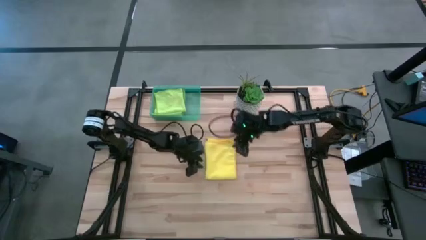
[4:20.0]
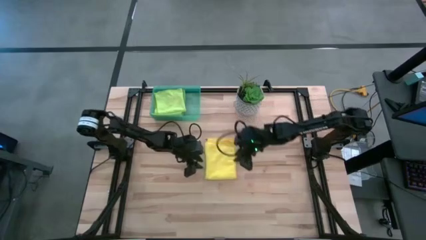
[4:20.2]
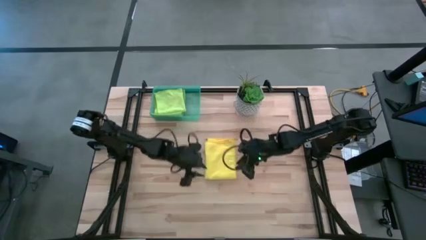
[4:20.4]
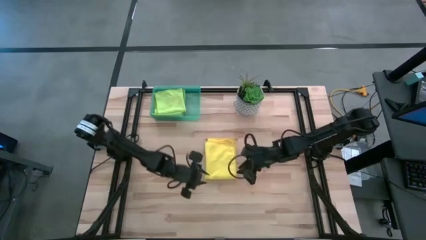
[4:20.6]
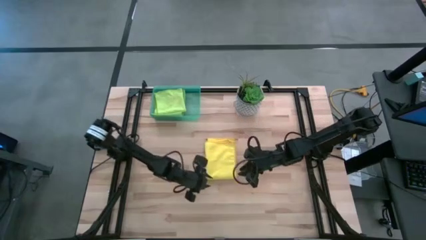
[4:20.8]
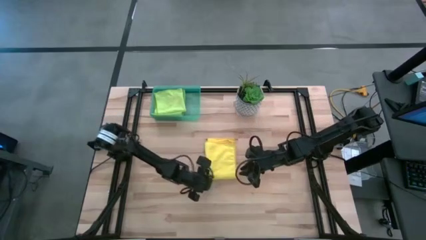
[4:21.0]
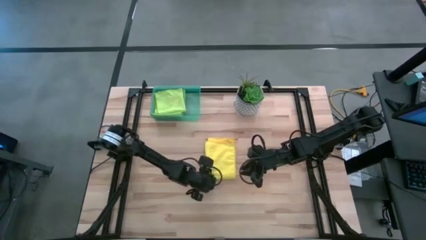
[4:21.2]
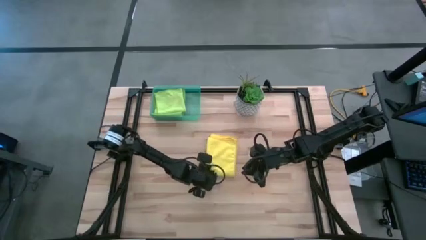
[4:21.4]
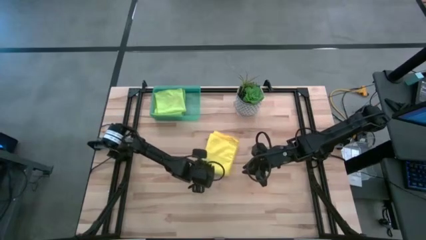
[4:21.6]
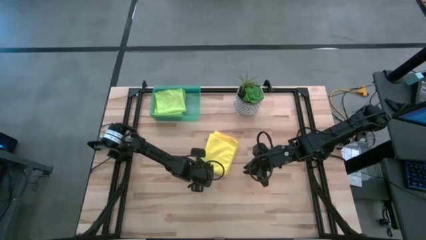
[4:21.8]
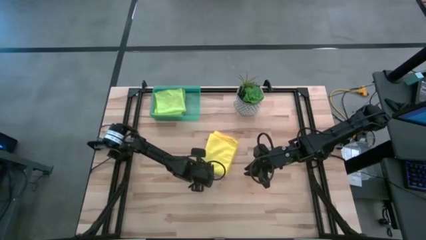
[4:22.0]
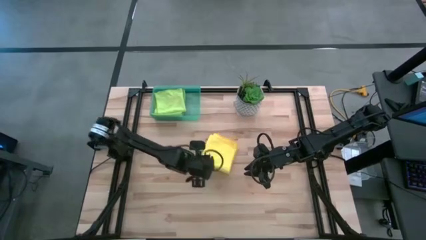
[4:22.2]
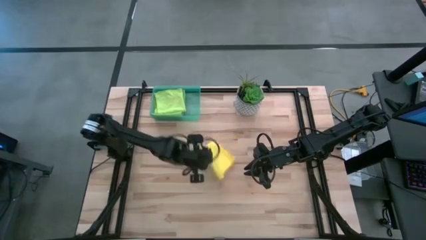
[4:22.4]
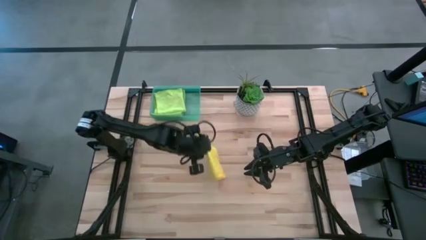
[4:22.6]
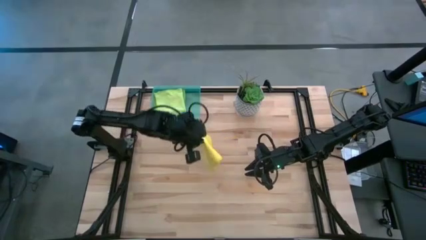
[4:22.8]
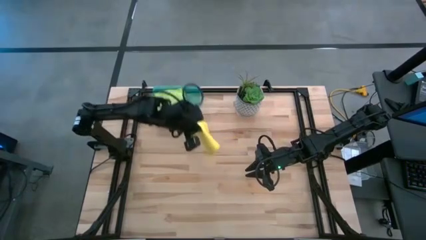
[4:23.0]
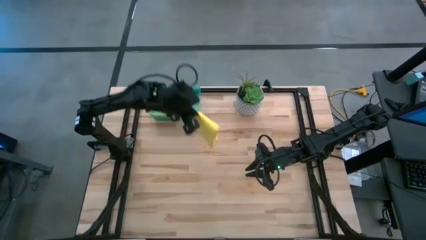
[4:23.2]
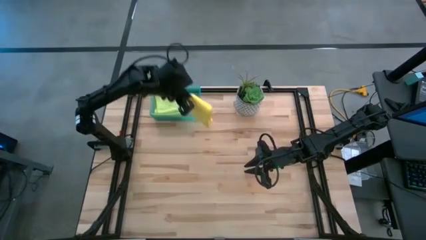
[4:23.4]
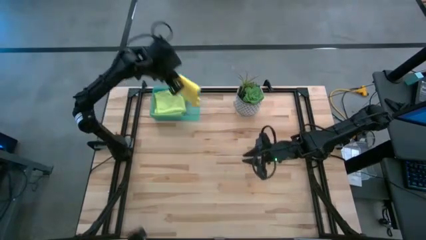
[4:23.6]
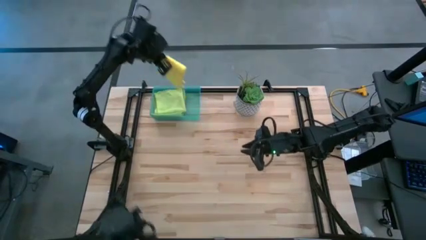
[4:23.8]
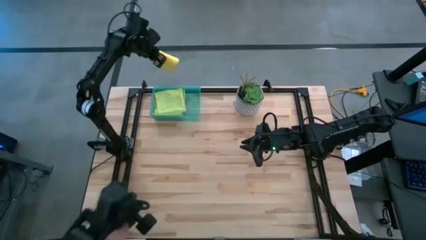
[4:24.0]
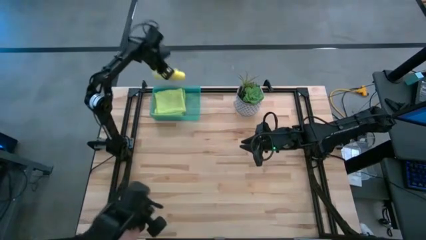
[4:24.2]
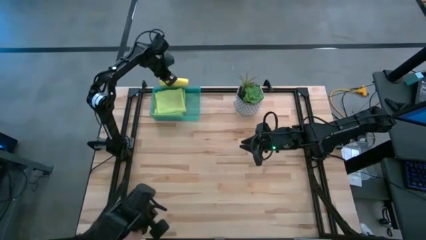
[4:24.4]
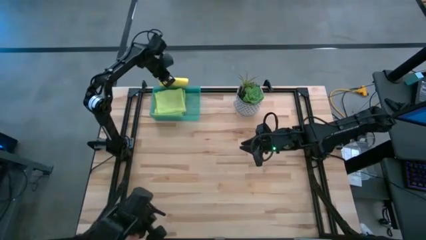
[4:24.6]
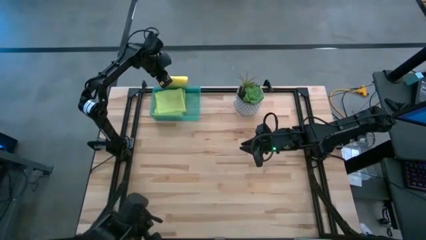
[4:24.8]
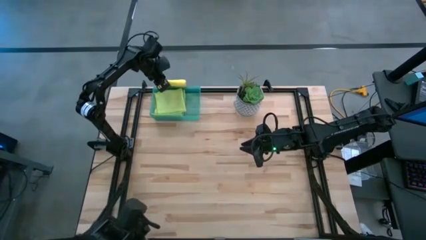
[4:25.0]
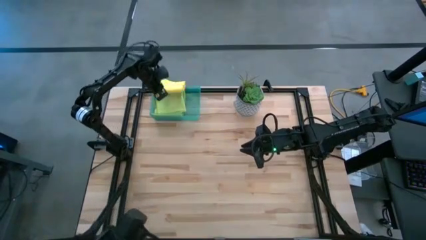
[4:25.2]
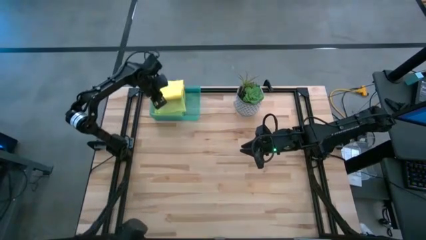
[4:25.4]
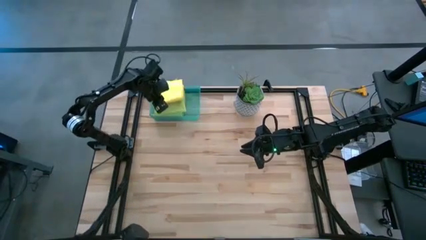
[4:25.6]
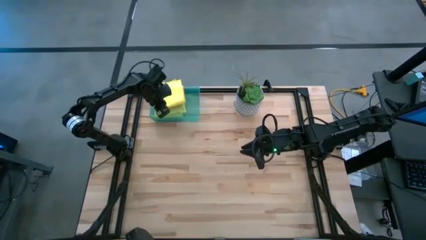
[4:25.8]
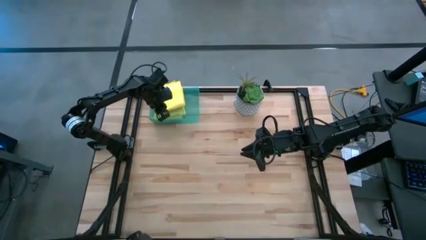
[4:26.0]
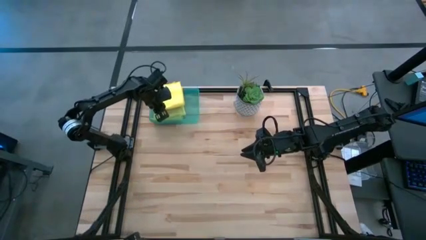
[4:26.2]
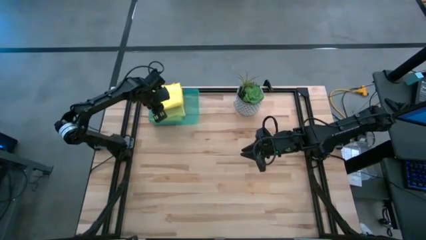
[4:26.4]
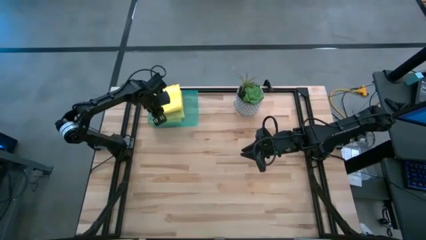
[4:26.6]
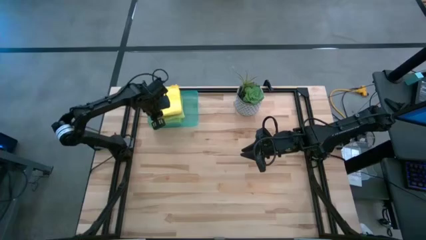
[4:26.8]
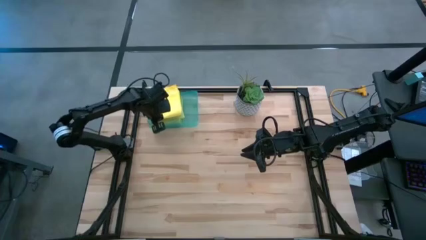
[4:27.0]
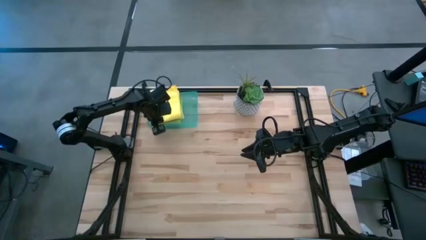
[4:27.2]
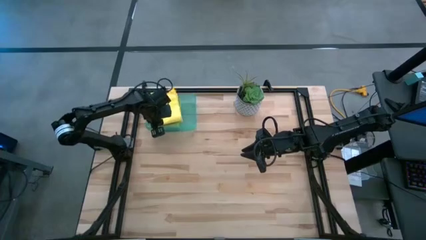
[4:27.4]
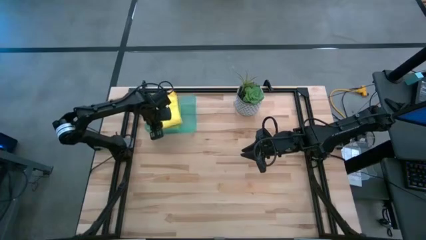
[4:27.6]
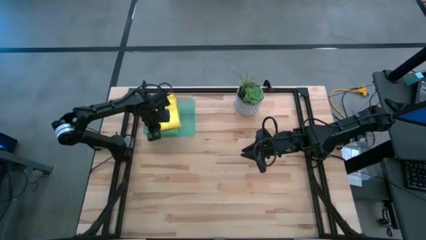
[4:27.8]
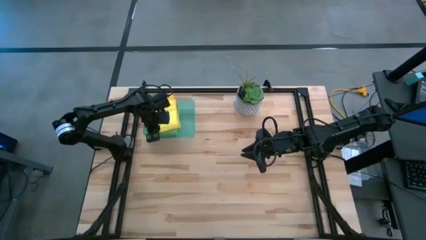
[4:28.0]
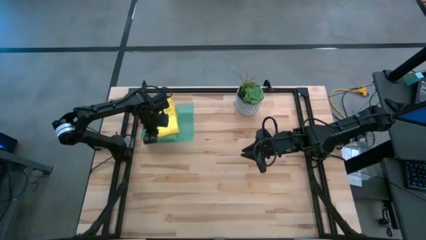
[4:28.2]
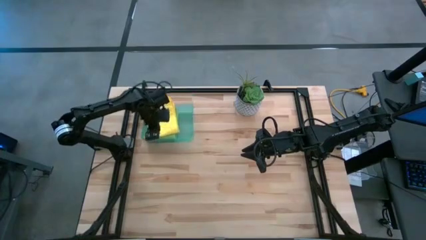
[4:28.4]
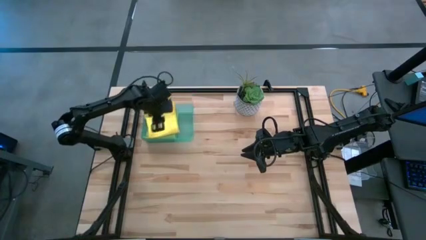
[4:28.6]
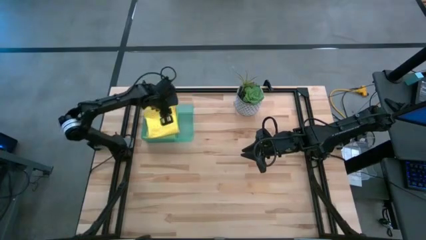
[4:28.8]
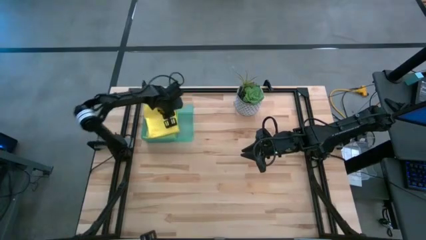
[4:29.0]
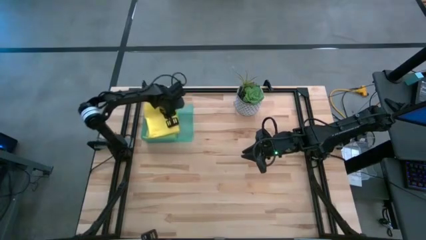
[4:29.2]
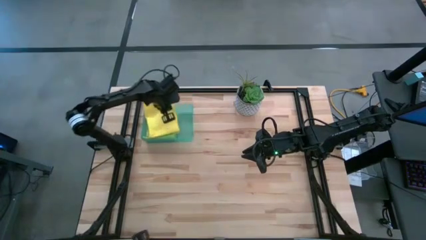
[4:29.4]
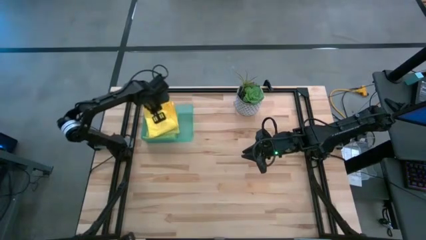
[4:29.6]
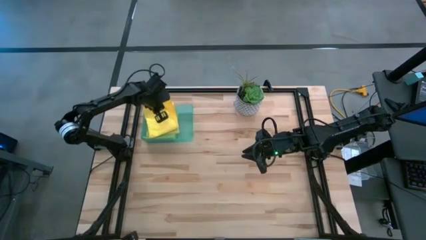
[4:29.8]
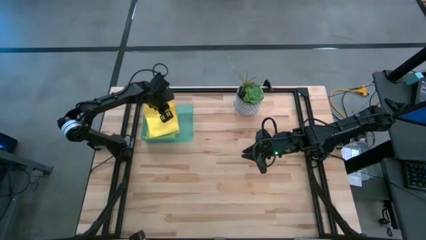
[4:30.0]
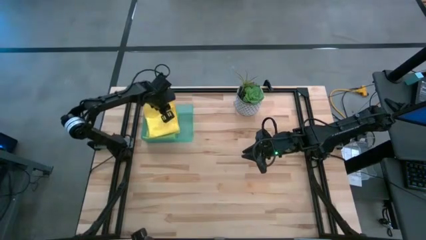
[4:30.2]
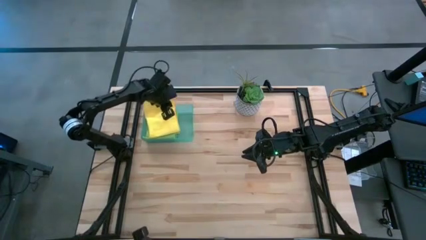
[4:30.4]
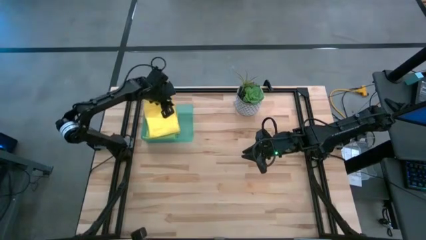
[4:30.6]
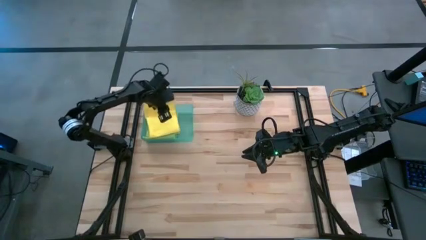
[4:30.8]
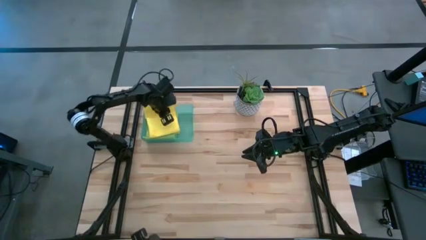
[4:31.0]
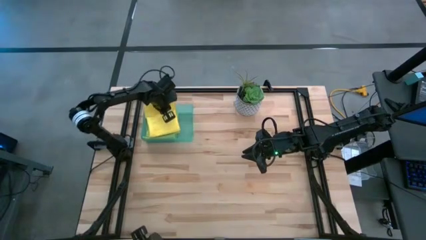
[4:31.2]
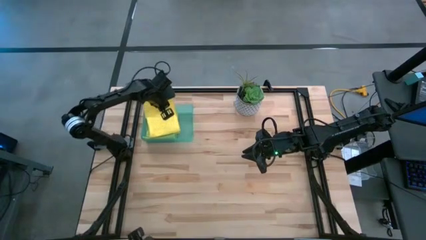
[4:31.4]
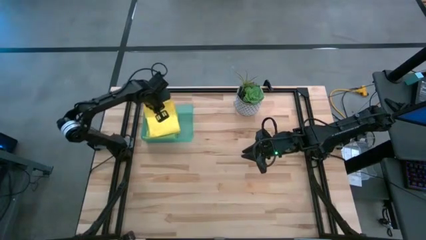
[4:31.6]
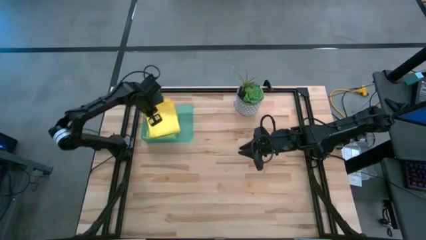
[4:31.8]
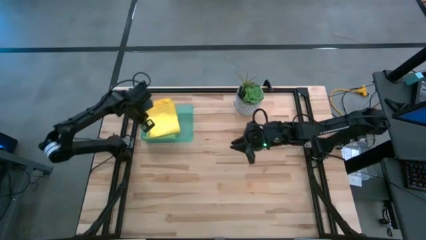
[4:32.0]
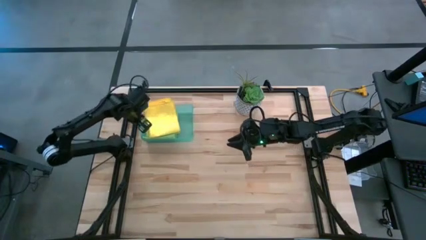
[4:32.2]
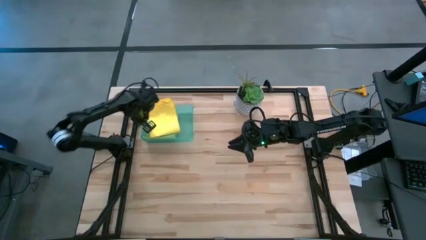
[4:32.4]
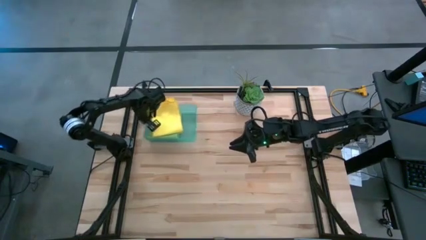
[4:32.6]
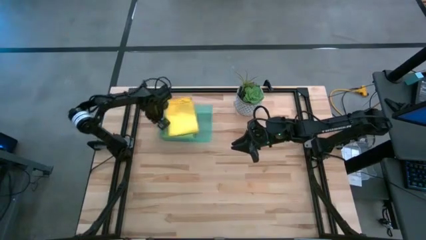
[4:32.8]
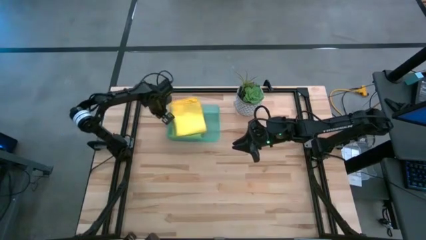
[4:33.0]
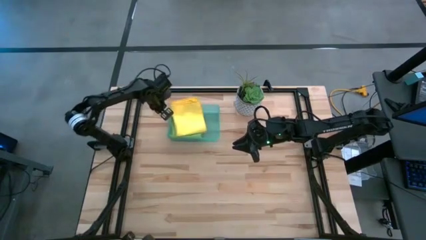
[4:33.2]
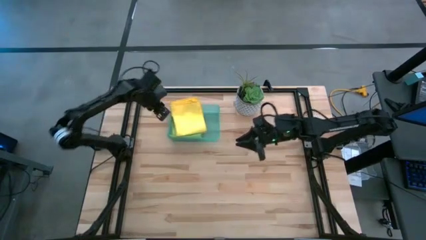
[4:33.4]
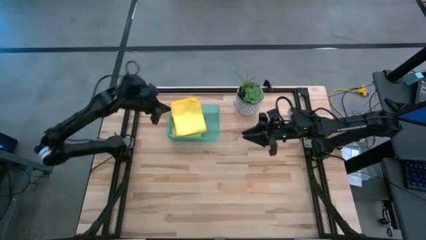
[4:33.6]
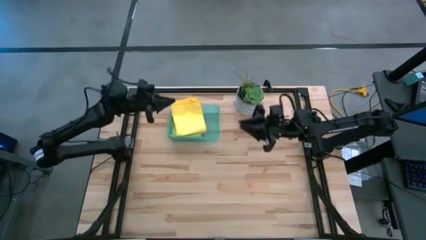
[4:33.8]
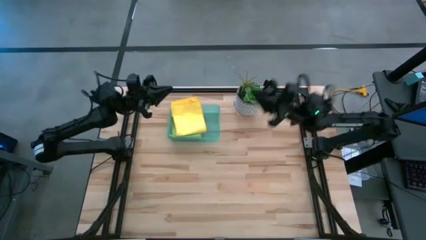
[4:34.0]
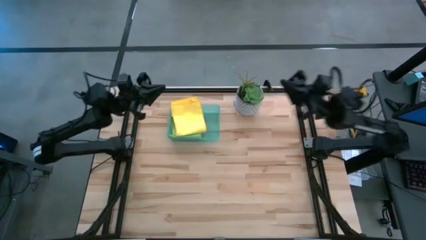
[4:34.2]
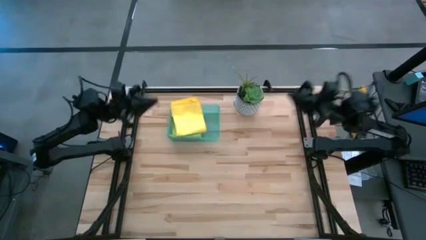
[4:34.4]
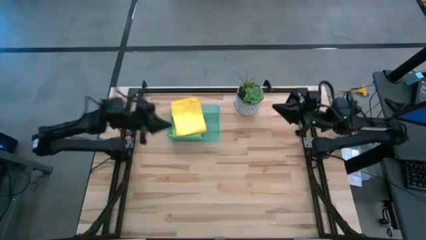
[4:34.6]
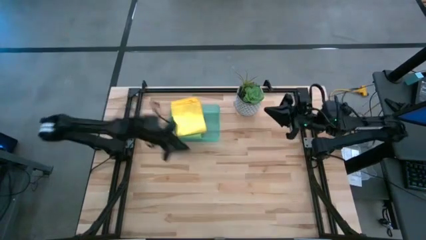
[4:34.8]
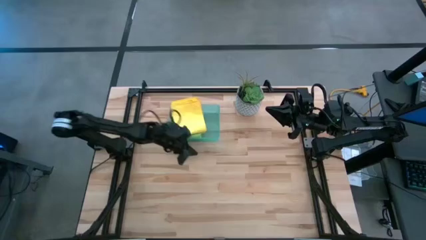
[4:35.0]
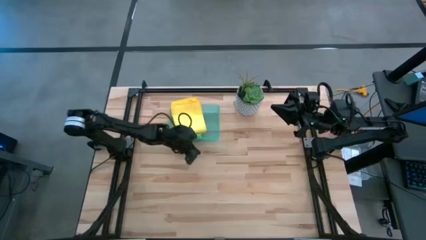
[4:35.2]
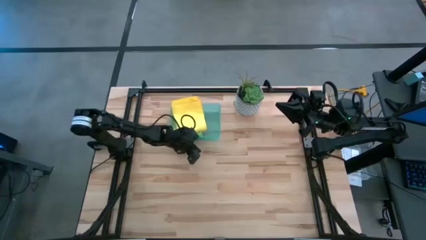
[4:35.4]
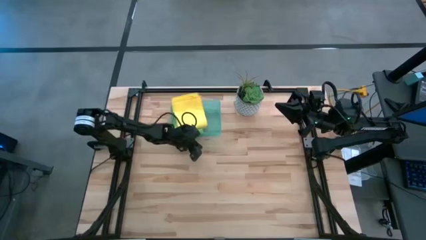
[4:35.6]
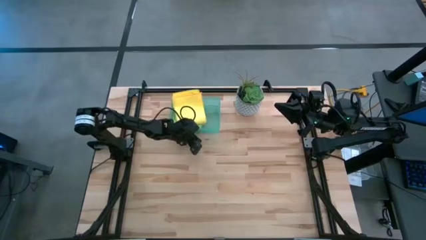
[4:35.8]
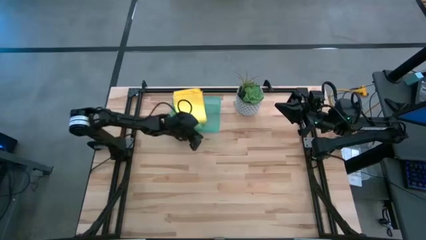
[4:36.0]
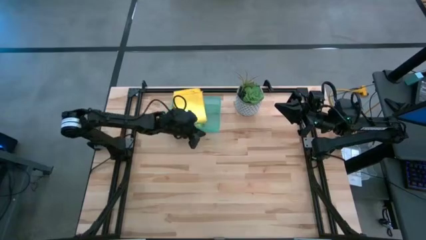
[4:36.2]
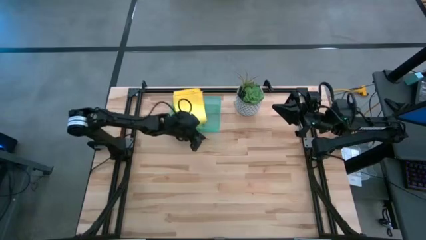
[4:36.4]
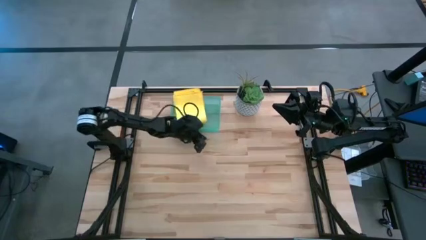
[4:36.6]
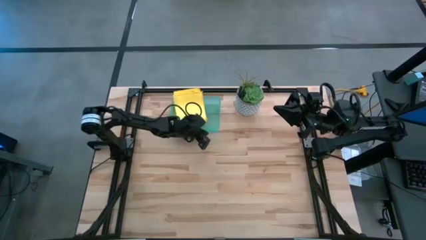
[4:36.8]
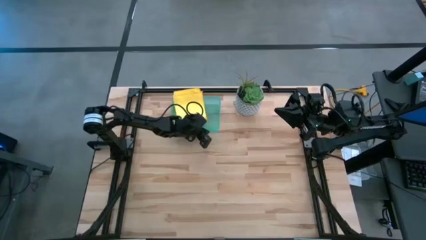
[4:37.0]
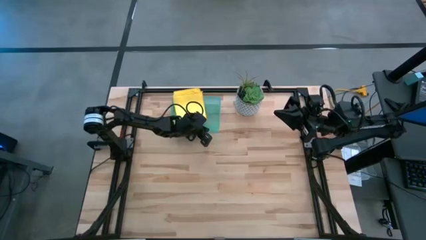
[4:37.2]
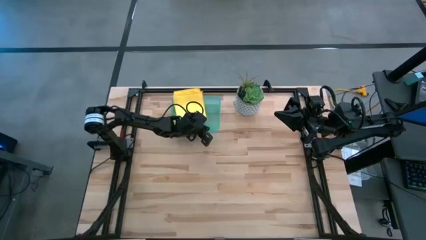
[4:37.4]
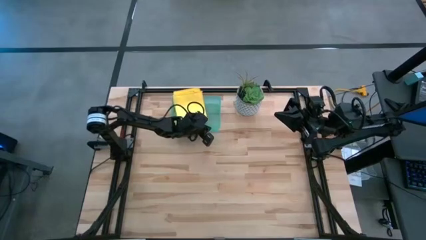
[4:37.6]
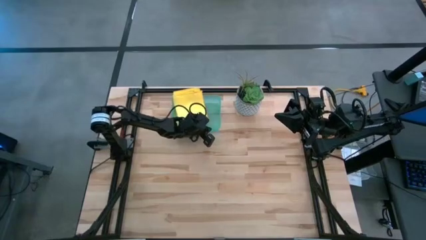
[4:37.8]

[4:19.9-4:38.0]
Task: Fold microfiber towels
Put the yellow microfiber cloth into the blue bin
